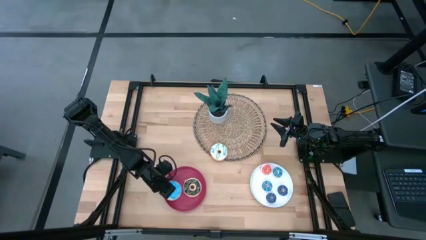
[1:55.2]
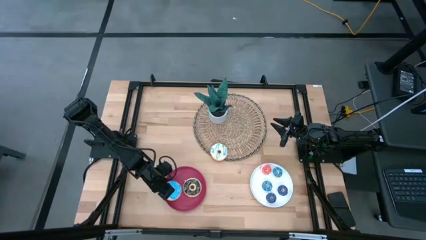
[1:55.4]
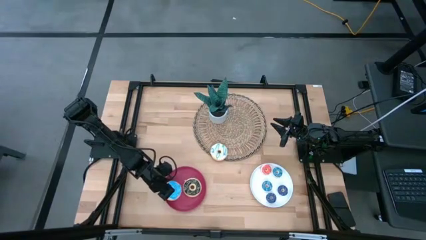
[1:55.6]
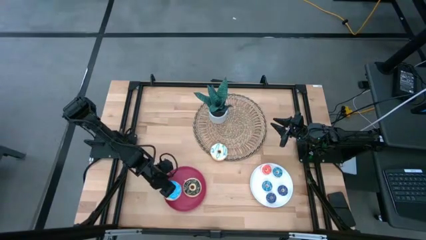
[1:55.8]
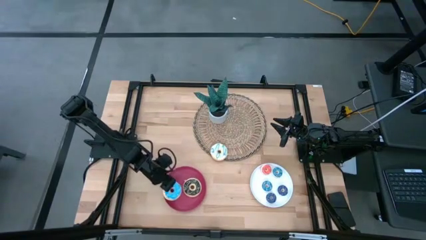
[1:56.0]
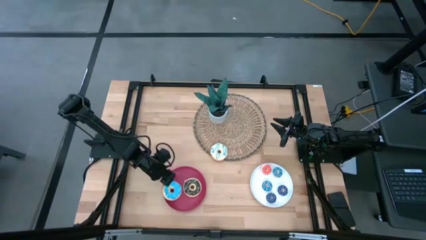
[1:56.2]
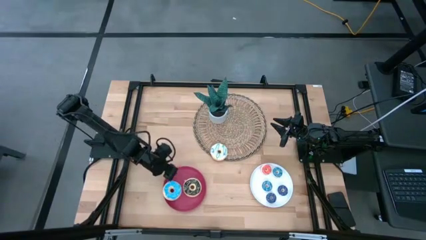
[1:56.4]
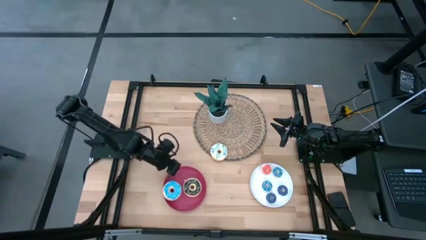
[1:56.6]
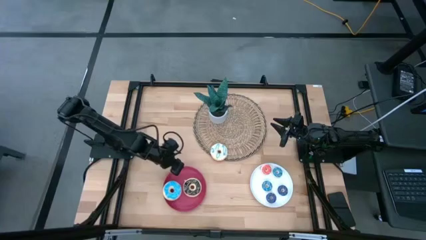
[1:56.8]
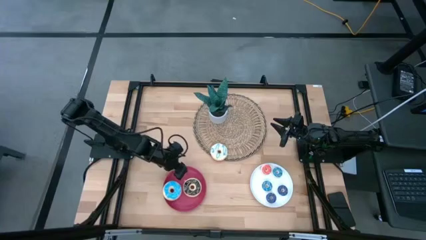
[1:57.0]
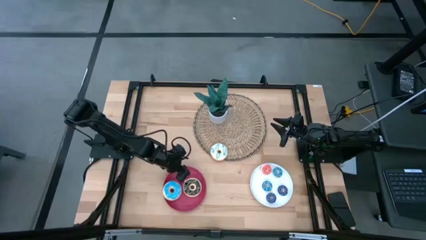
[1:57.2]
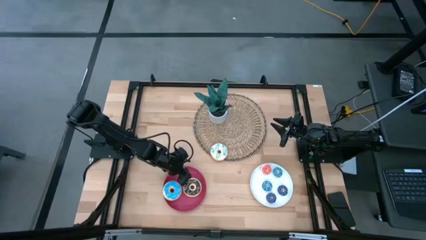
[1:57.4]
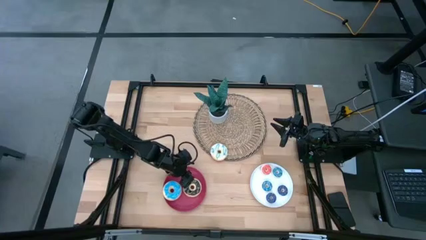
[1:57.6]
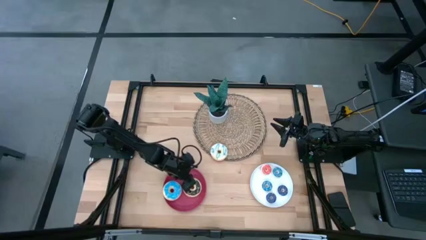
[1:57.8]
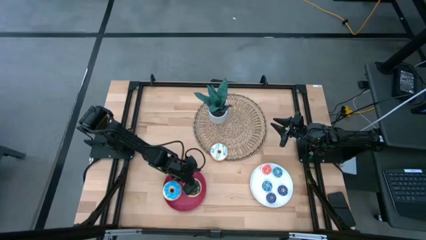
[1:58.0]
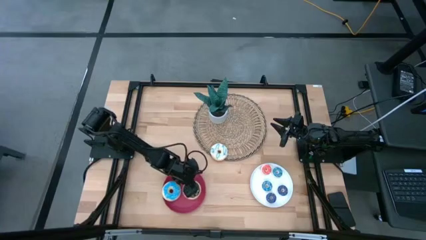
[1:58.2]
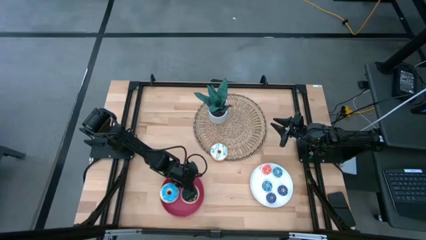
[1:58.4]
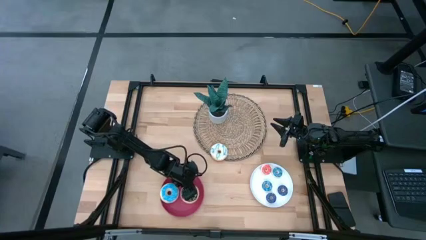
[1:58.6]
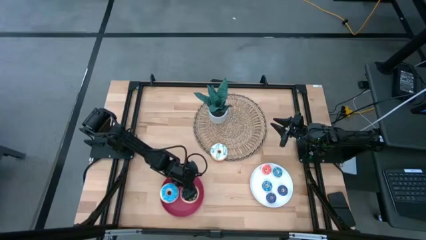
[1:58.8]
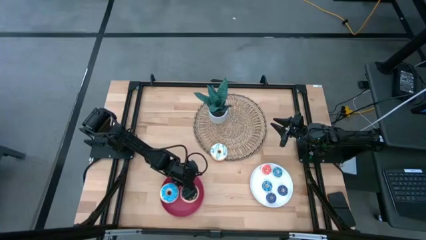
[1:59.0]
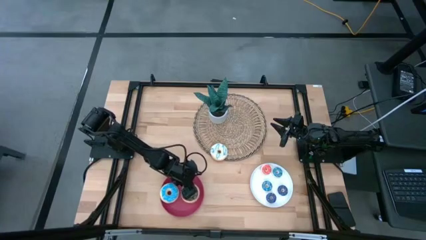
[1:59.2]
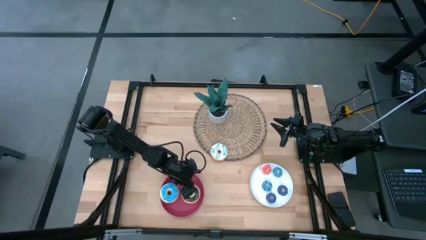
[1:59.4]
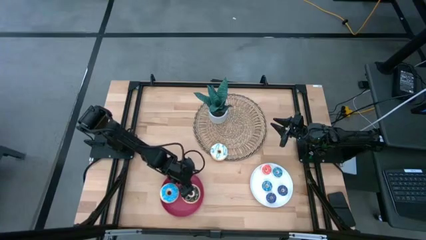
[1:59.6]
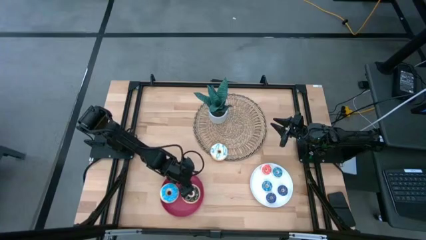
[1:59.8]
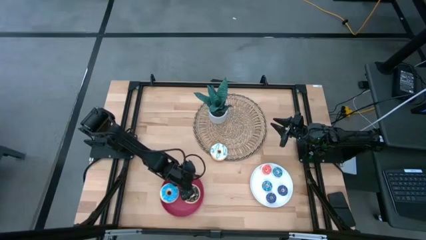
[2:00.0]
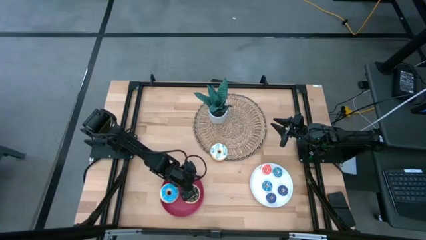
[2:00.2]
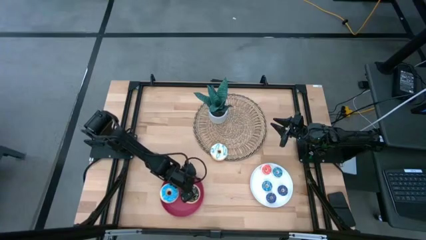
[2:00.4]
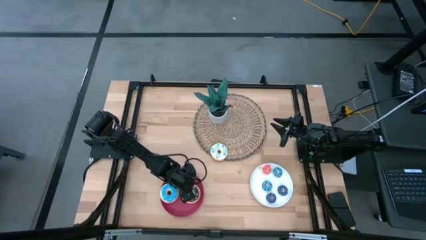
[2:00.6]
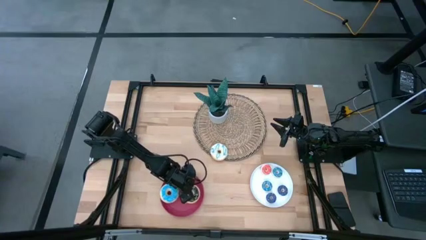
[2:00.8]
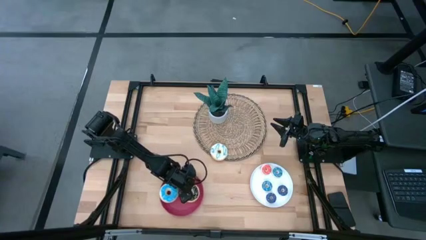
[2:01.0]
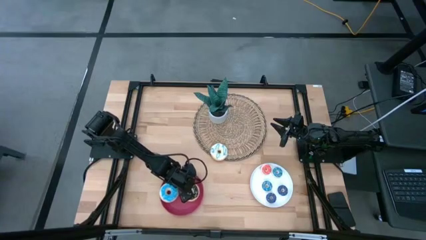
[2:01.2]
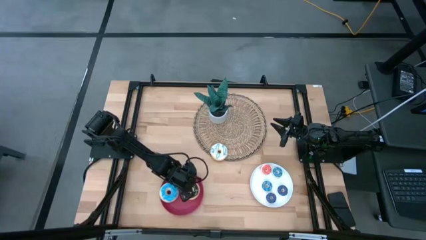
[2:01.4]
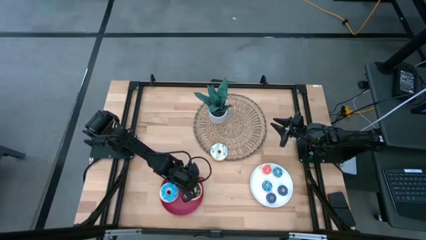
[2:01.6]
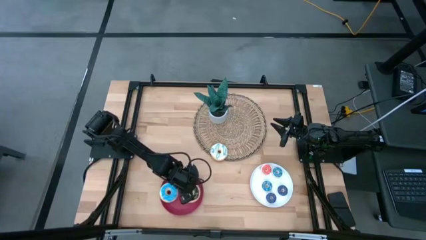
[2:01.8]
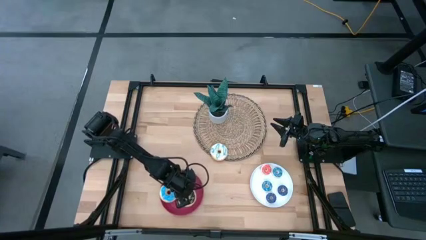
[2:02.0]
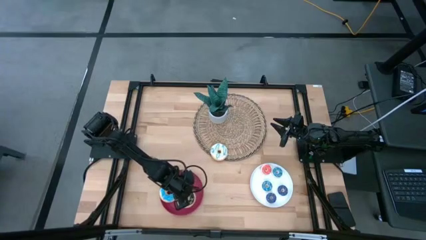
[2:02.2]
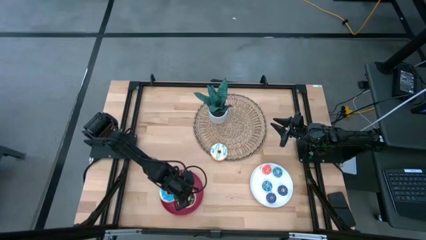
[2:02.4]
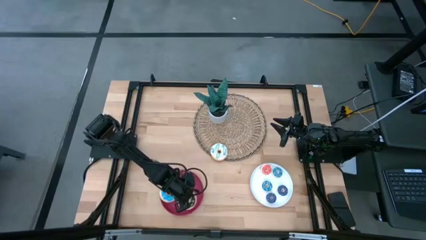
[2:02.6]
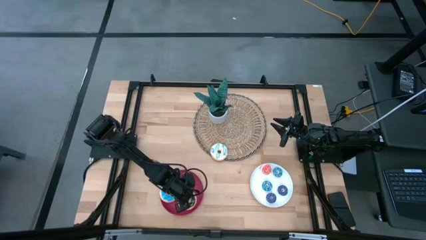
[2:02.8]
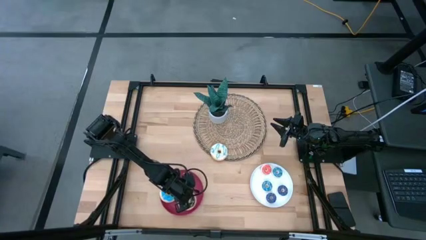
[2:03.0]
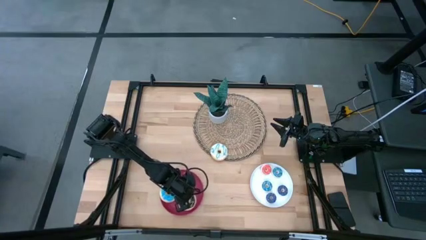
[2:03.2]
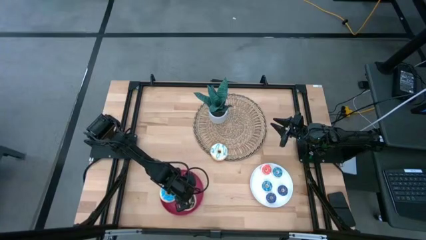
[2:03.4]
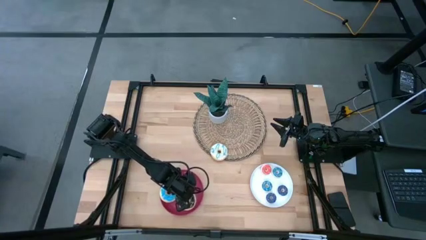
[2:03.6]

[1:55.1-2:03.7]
Task: Pick & Place donuts
Adjust the black donut on the dark pink plate

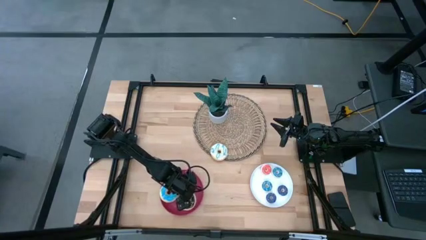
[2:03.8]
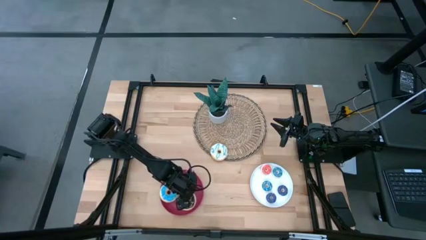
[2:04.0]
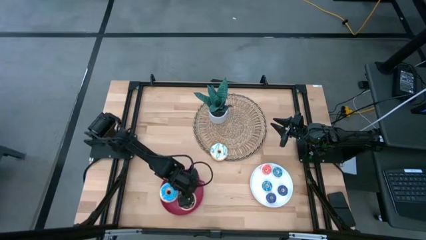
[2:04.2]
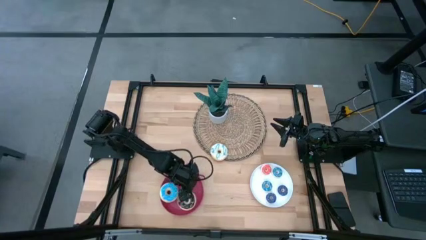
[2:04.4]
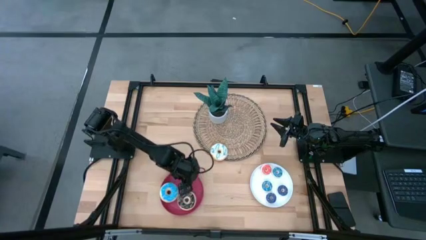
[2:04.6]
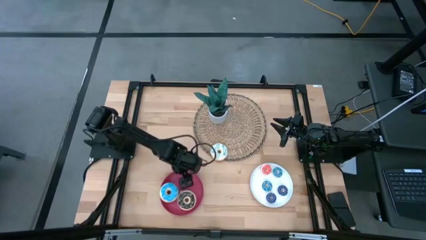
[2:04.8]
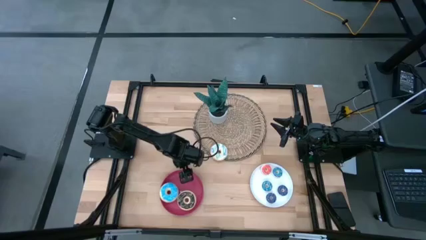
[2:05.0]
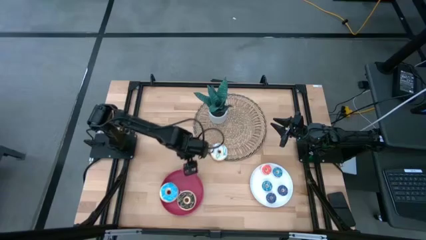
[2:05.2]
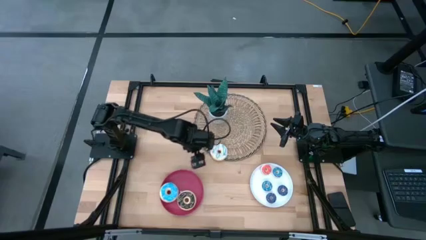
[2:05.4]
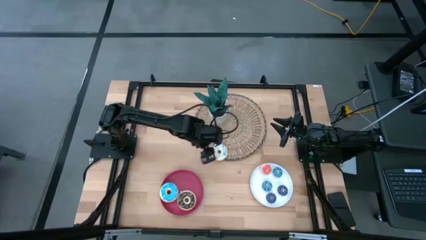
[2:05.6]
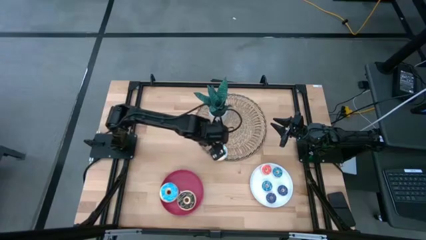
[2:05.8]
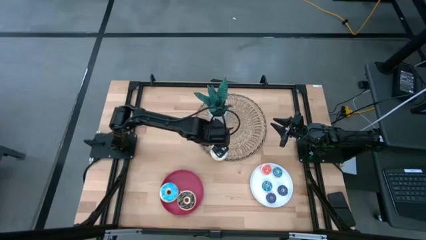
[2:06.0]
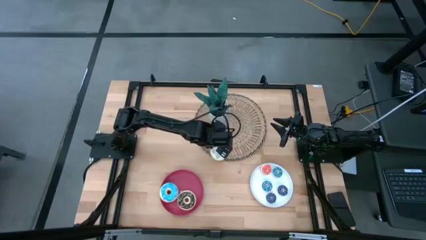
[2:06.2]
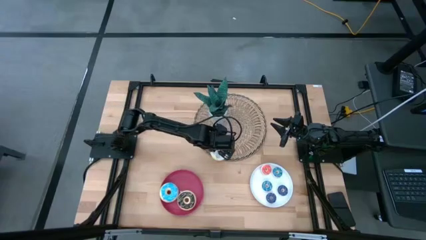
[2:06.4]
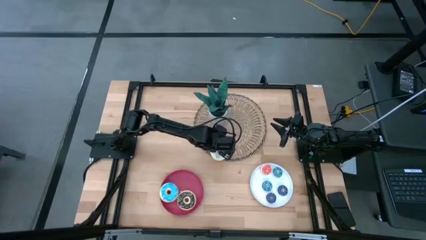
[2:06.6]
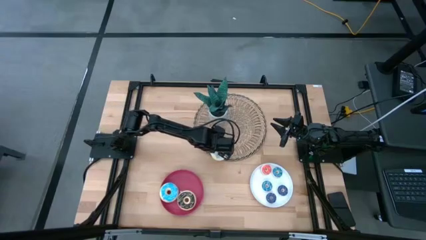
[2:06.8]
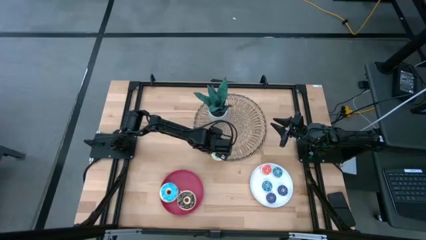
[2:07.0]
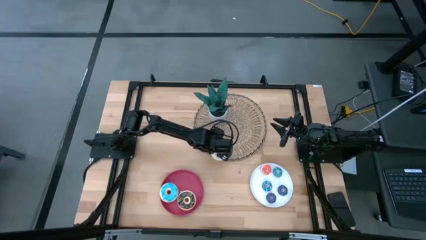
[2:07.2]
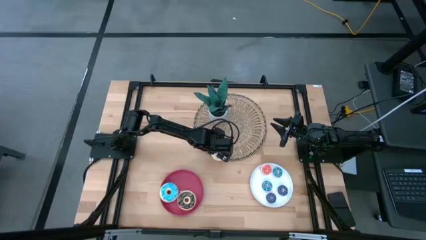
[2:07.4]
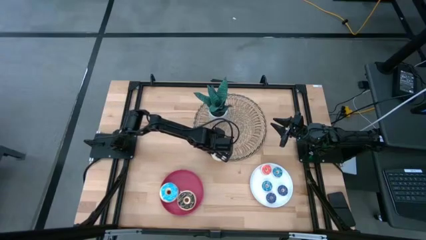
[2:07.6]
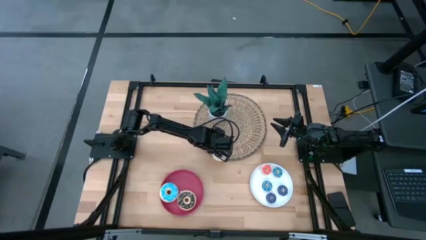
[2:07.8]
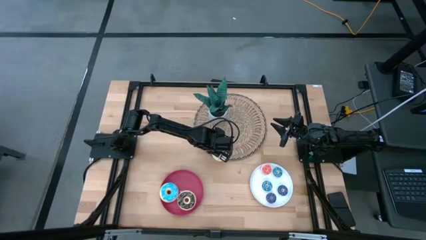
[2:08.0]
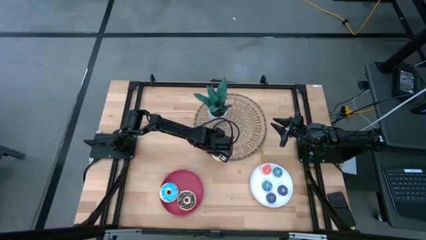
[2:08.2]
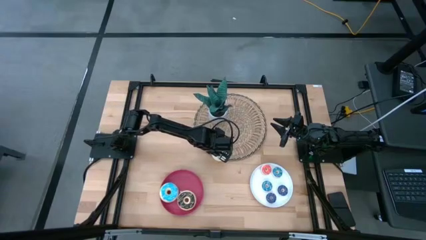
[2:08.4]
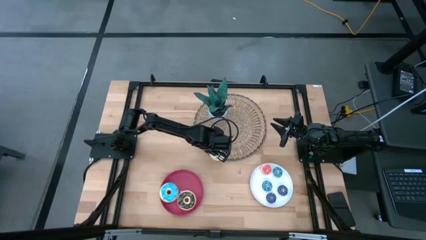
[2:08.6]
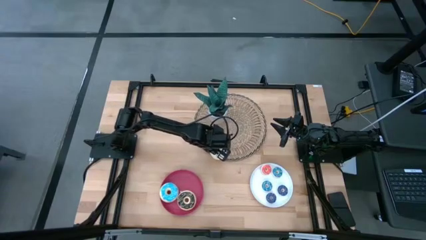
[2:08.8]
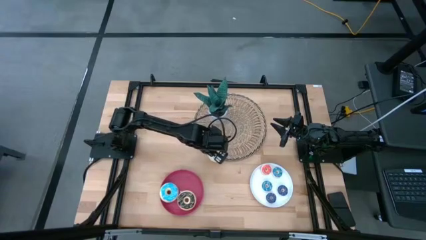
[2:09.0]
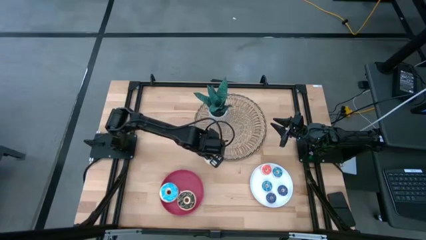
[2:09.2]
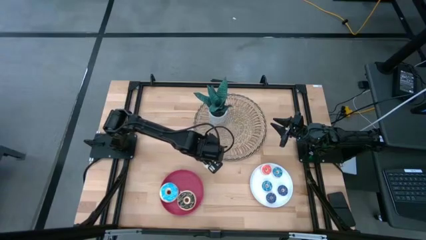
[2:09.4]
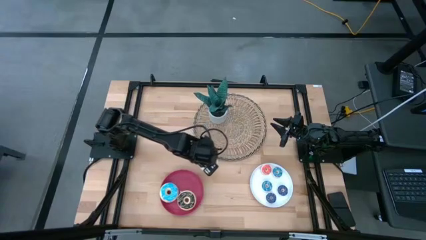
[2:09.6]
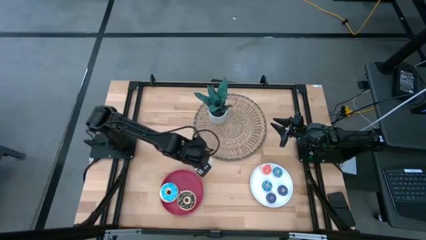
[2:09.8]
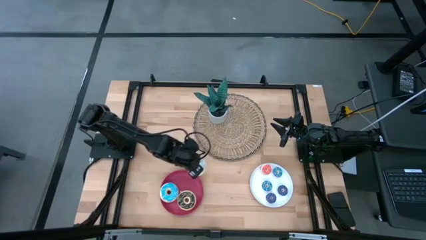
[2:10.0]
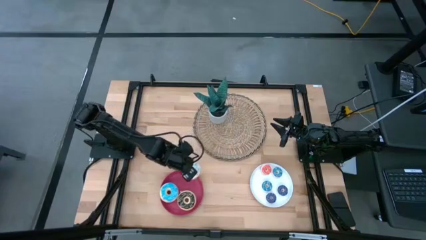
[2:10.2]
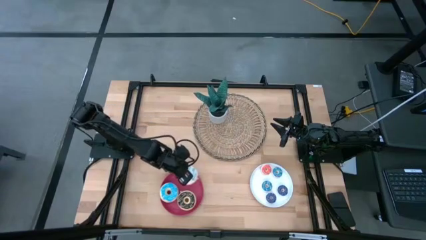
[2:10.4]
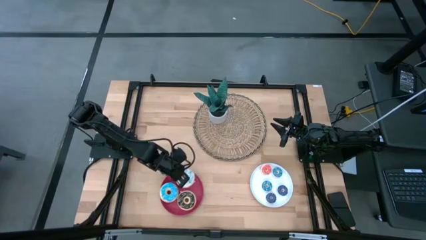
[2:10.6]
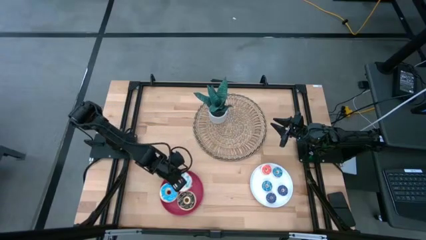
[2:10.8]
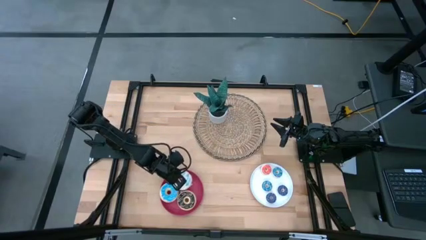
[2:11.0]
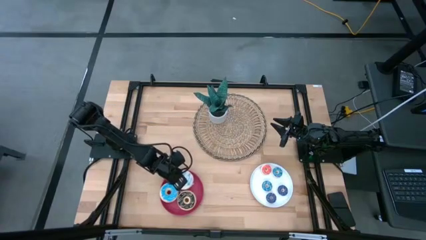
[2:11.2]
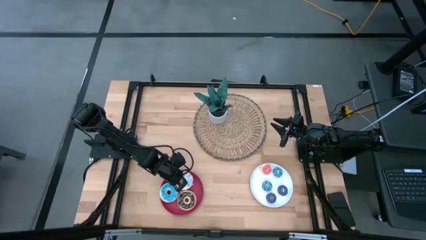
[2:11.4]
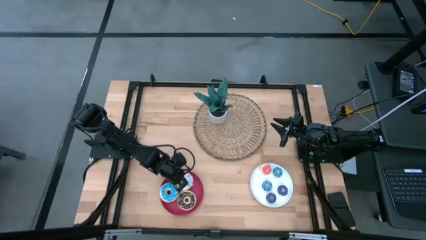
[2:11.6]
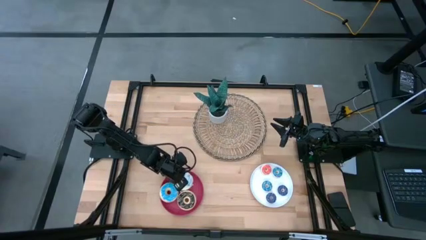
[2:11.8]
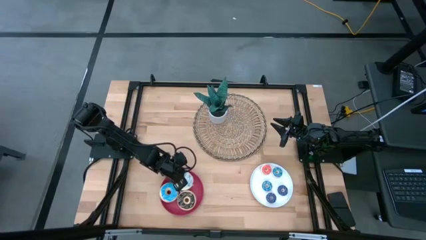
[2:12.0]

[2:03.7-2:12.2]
Put the white donut on the dark pink plate
